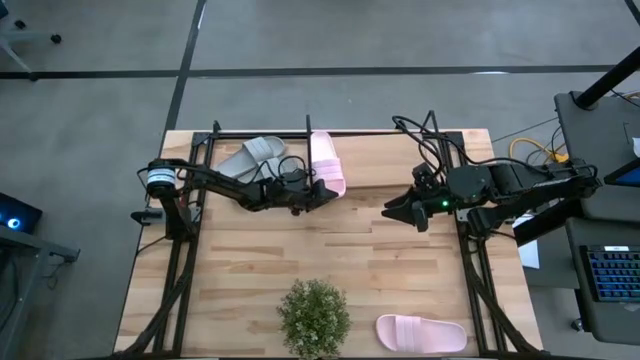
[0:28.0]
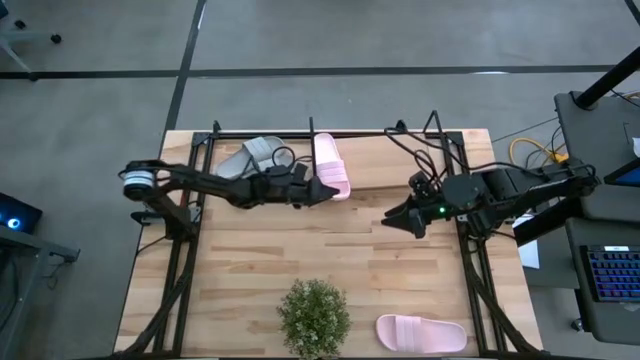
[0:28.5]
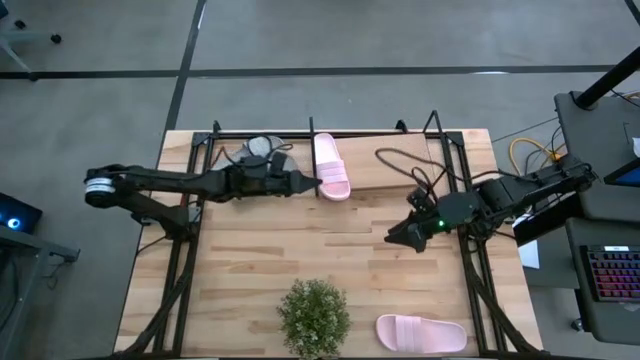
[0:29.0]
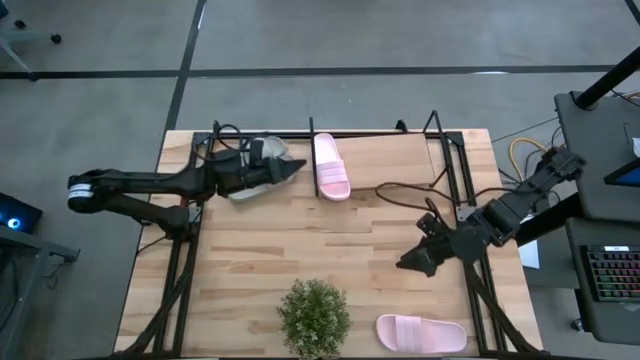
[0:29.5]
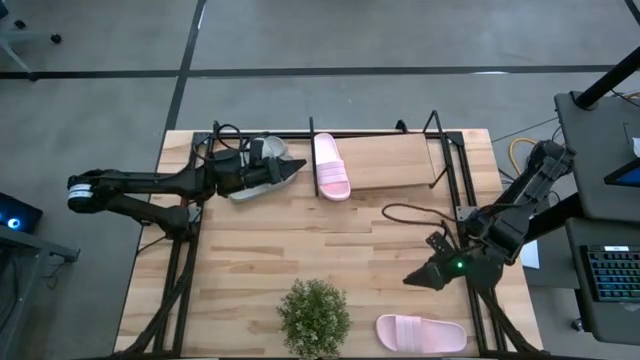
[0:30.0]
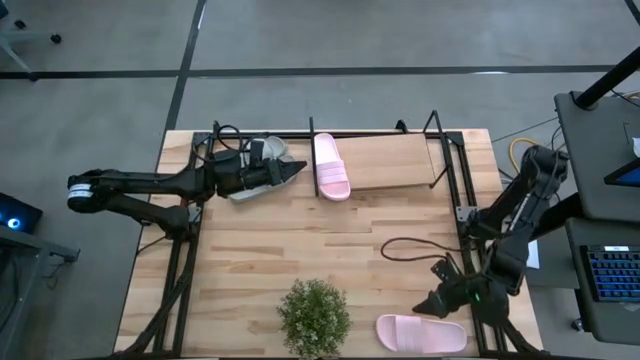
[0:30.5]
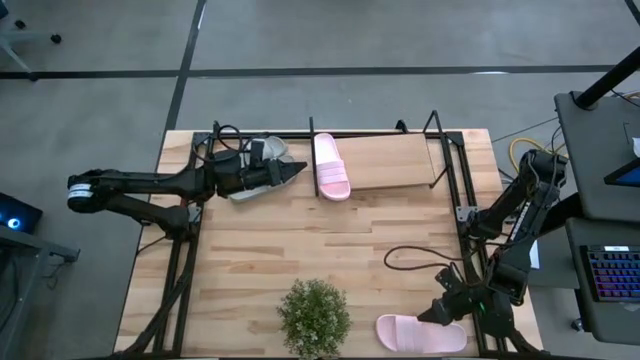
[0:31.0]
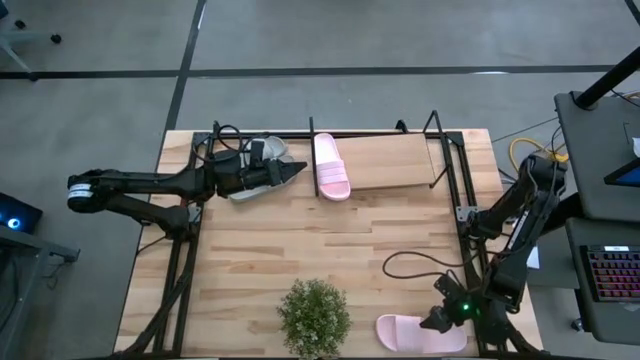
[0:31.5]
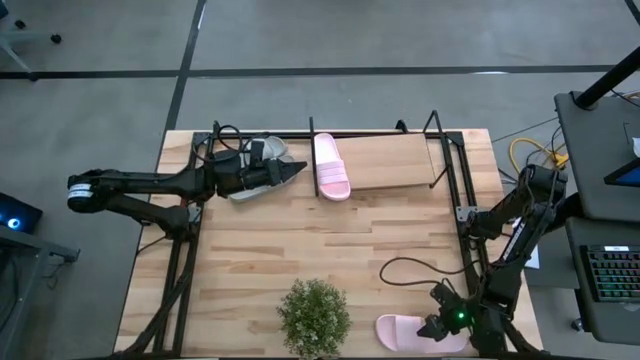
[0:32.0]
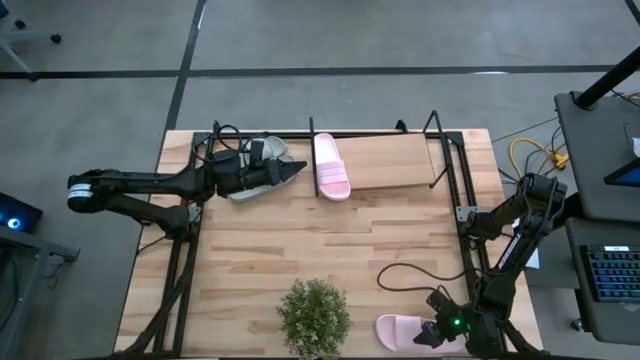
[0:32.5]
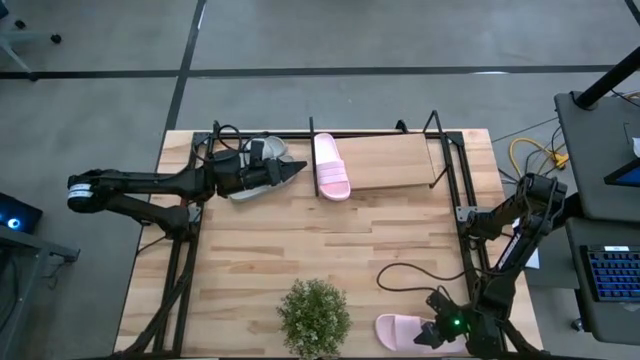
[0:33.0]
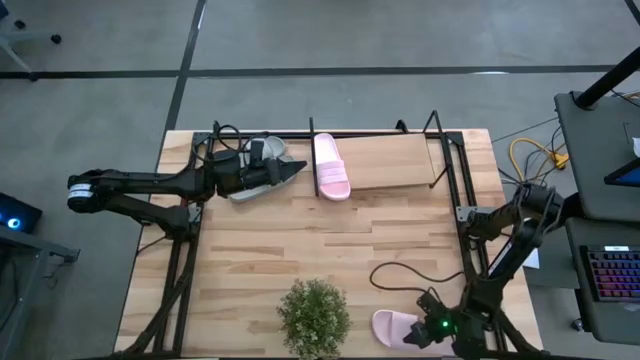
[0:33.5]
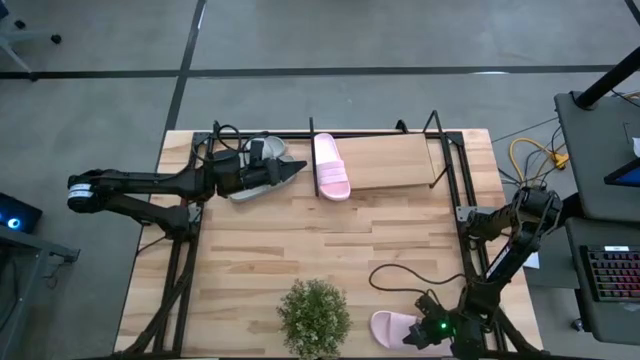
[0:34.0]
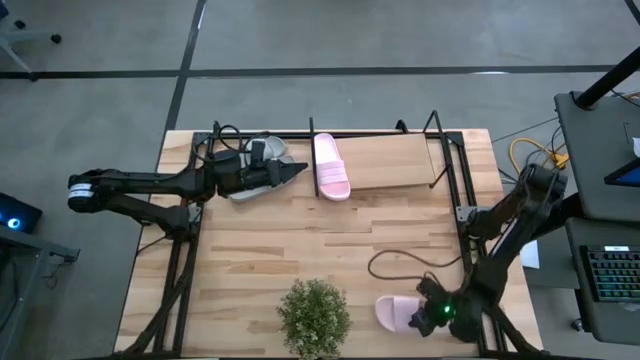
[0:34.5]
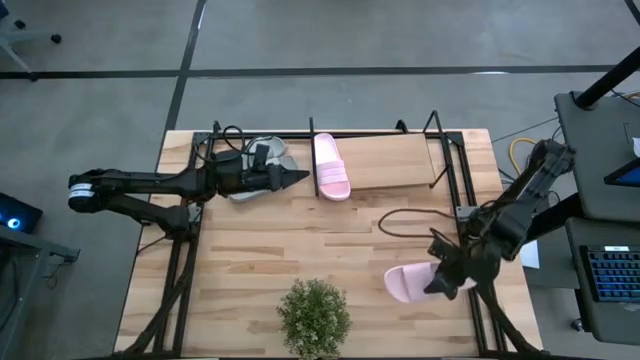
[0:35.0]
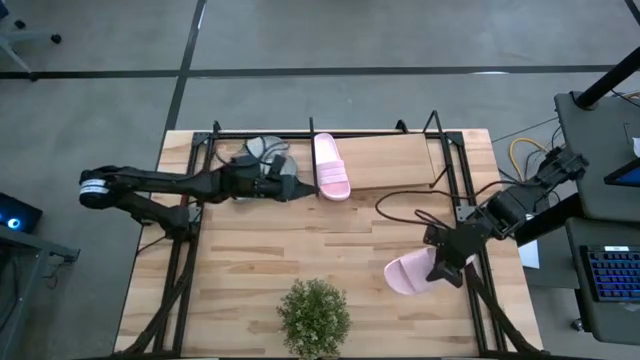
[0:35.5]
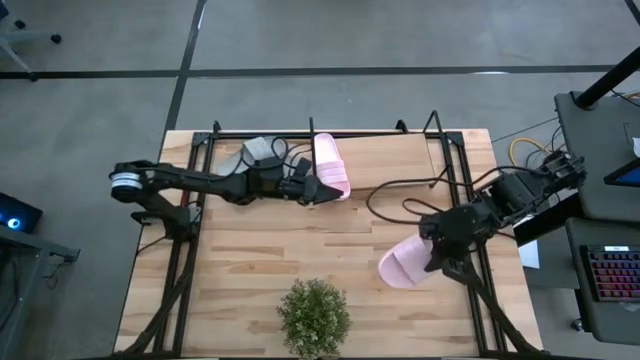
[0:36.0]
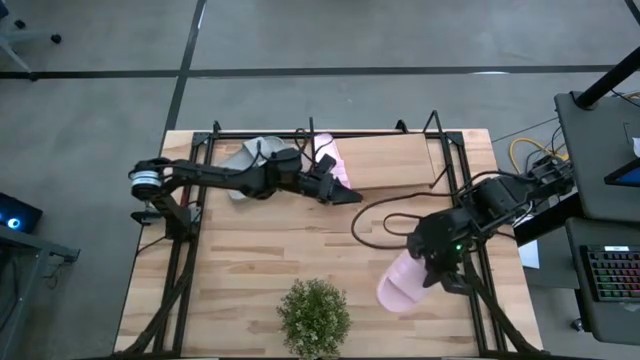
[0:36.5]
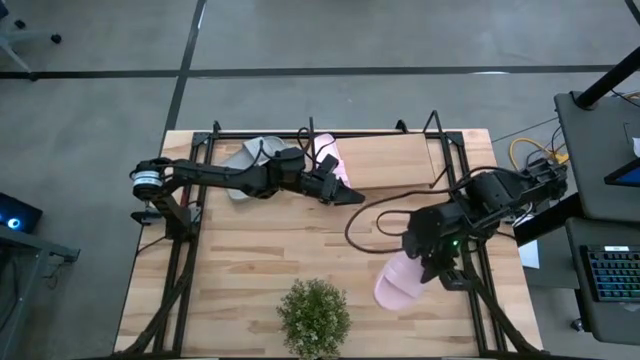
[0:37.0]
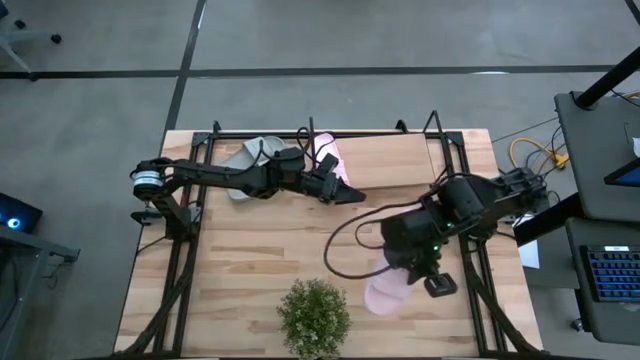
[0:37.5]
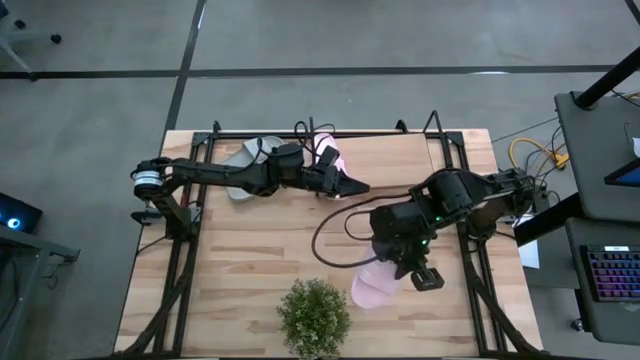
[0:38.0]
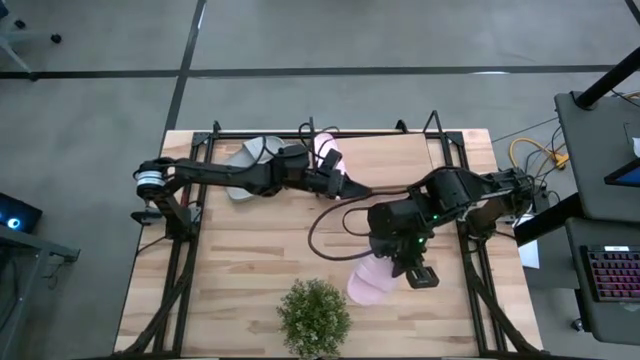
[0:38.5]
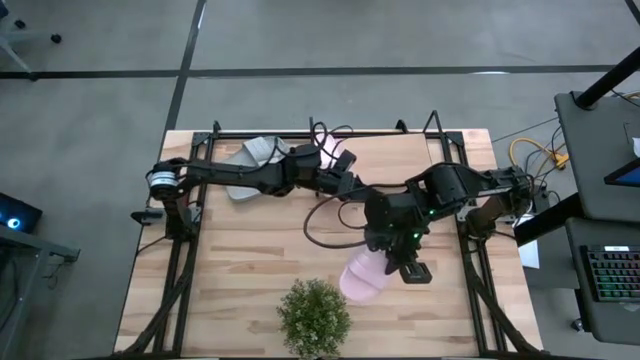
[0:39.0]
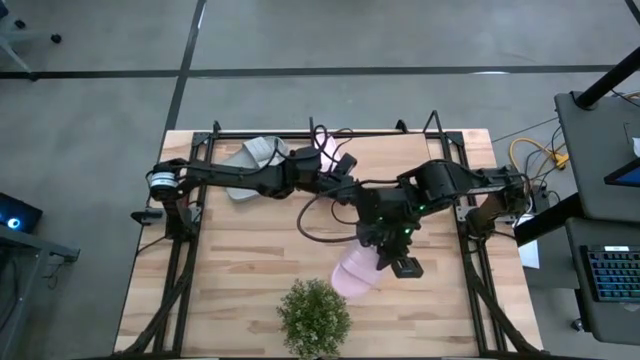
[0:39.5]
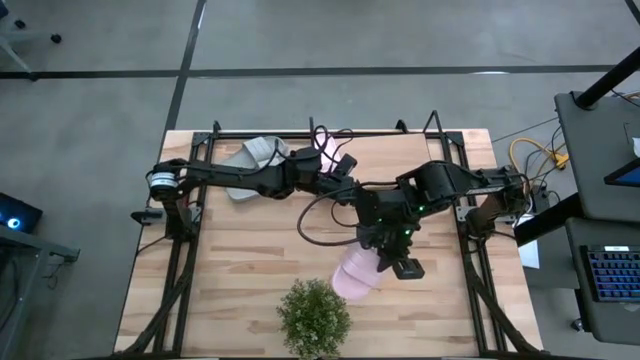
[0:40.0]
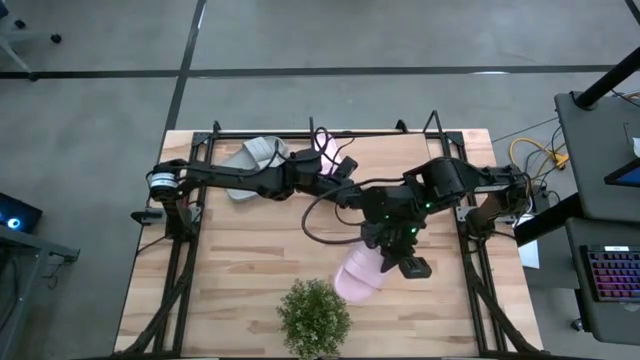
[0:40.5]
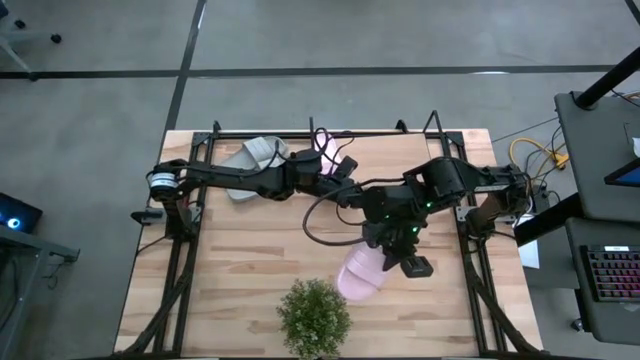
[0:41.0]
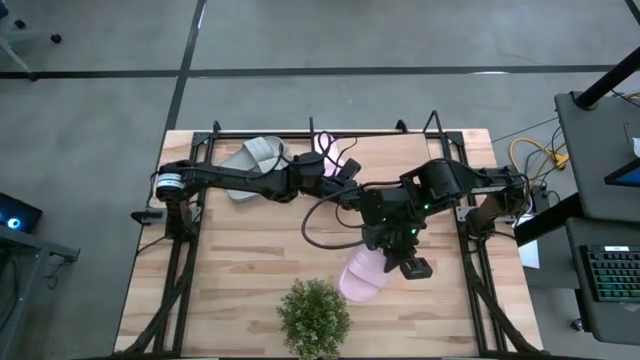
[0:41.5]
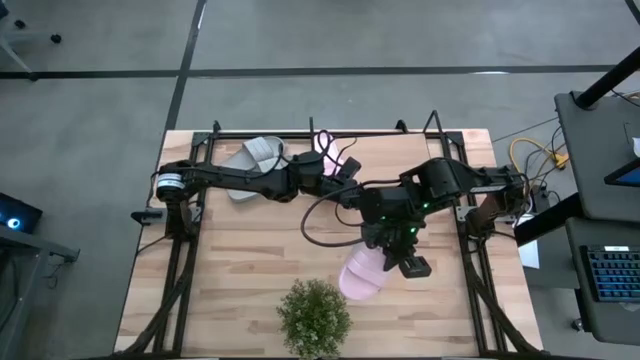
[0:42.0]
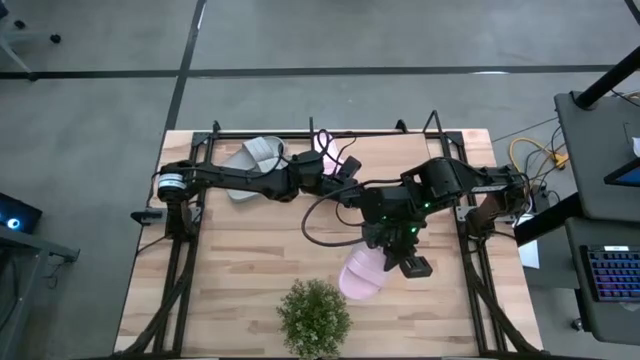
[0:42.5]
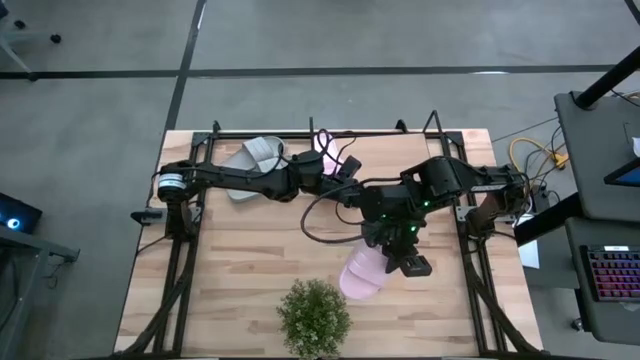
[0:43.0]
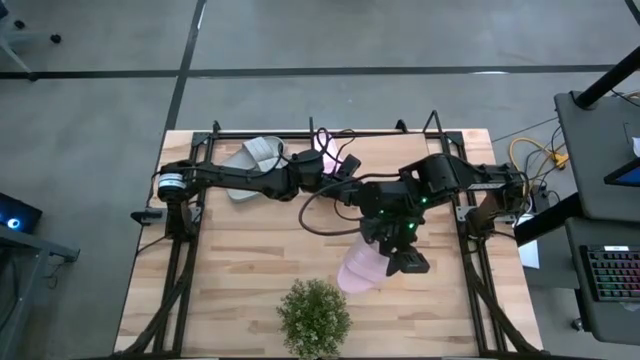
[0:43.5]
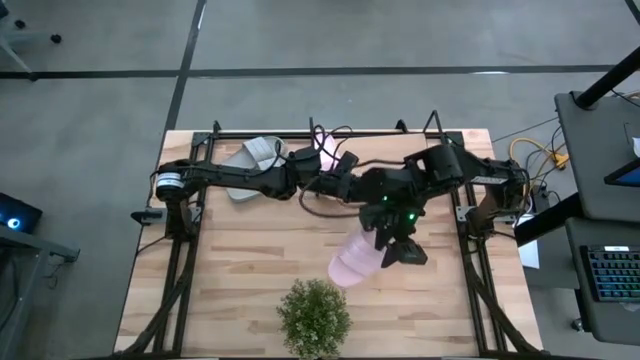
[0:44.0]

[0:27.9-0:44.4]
Task: Pick and place slides into the shelf
Put the pink slipper on the shelf

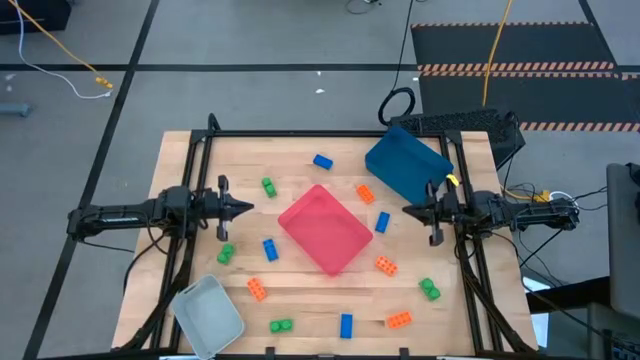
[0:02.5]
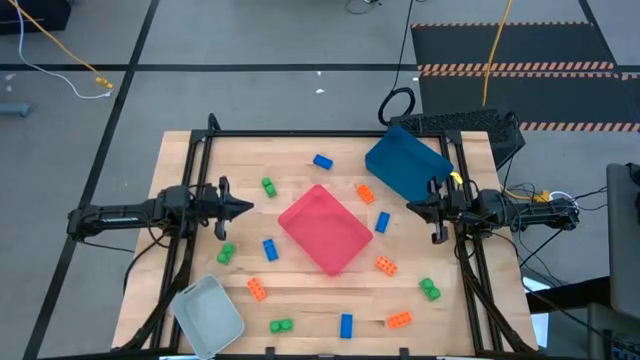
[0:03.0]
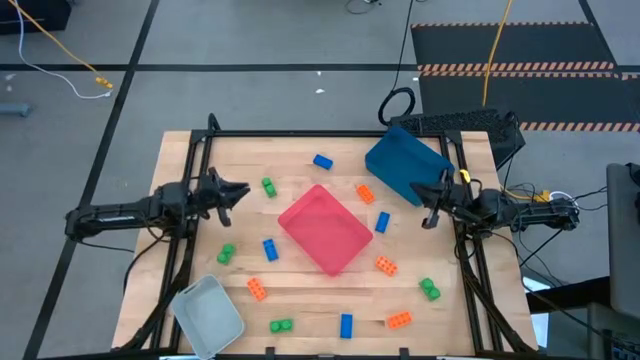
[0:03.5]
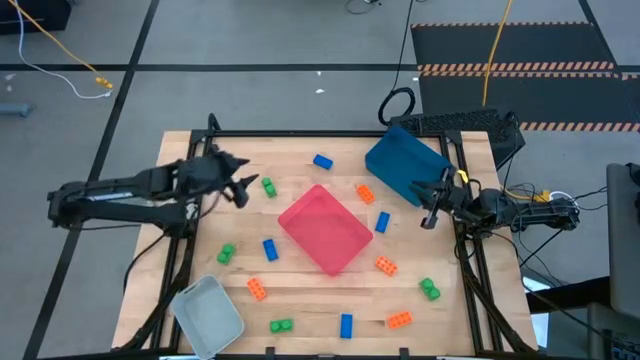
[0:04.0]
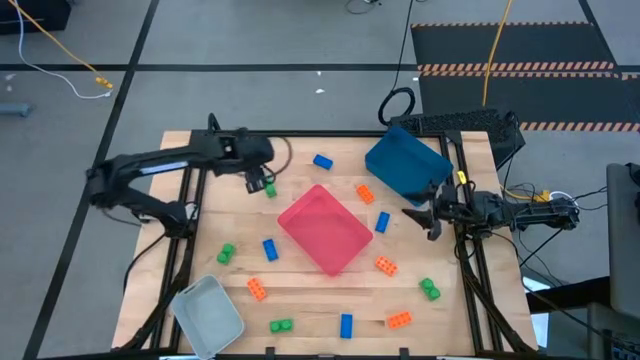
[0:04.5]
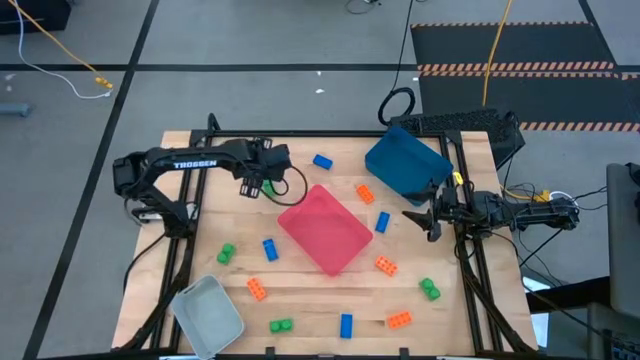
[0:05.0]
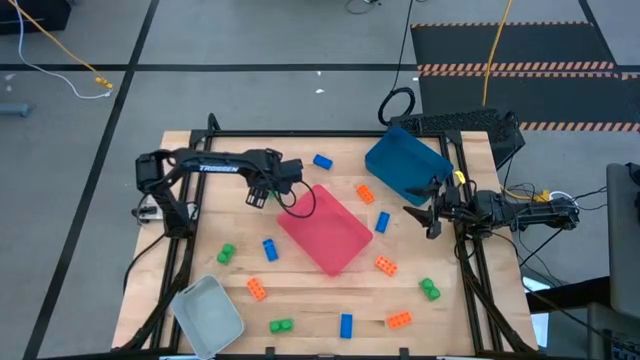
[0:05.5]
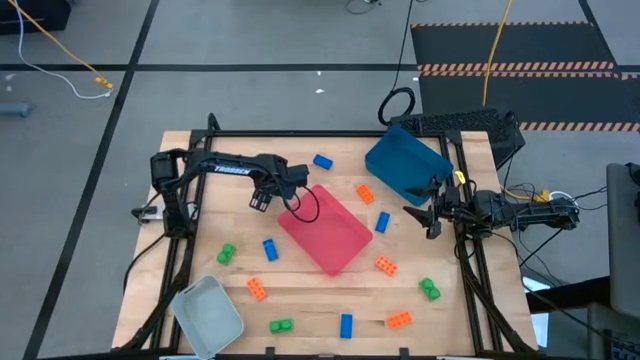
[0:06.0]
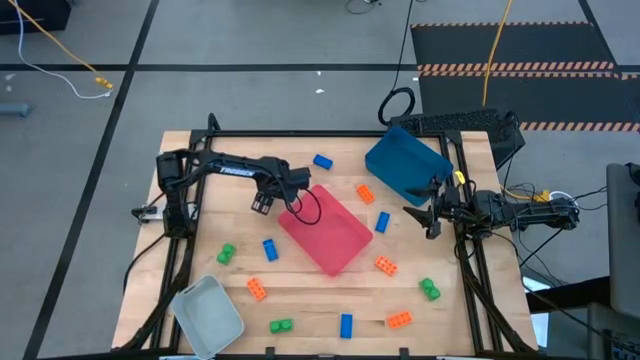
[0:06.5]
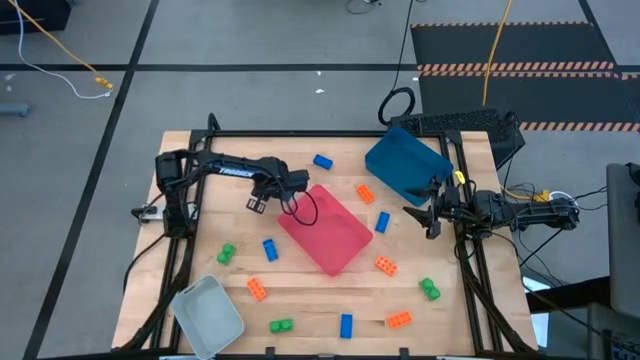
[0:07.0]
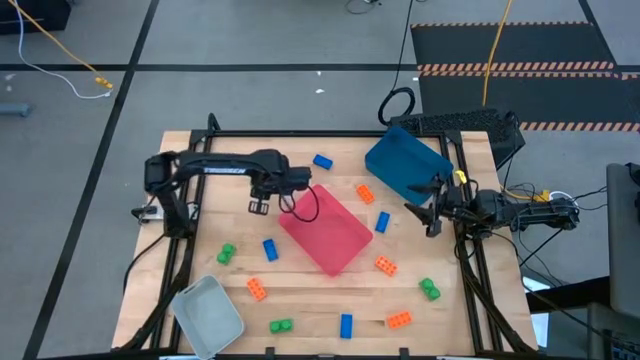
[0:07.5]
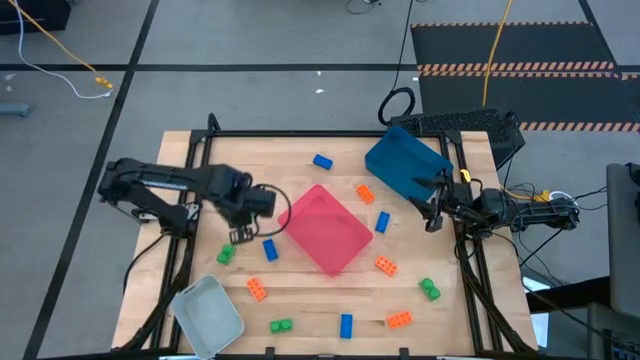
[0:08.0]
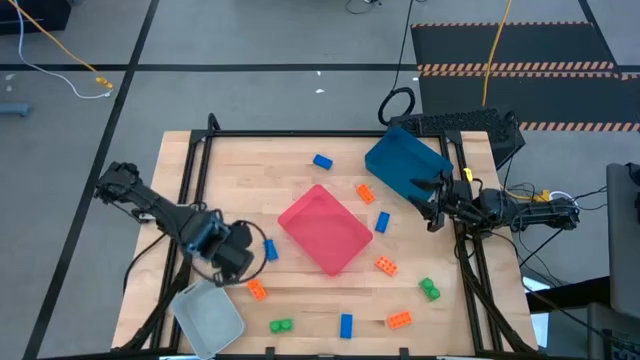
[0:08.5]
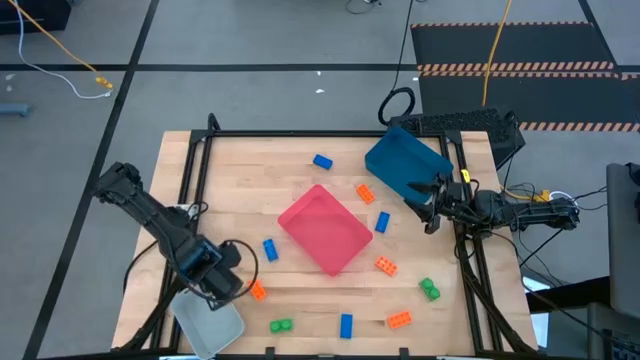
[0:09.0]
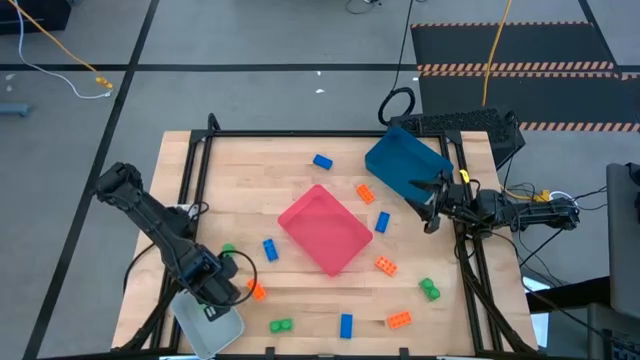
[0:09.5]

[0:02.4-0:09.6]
Task: Sort & place blocks by color
Put the green game piece into the gray bin
